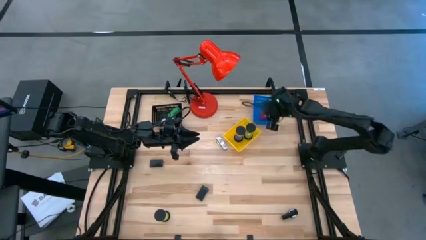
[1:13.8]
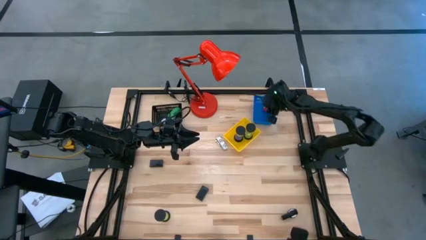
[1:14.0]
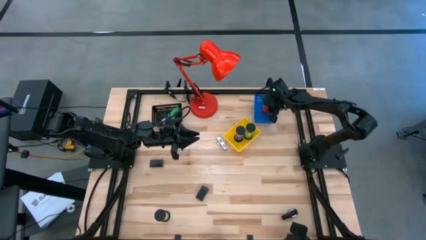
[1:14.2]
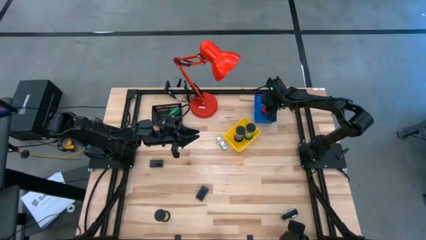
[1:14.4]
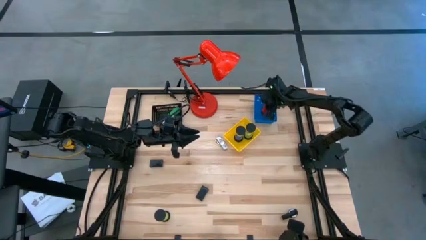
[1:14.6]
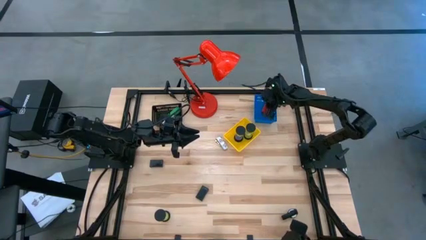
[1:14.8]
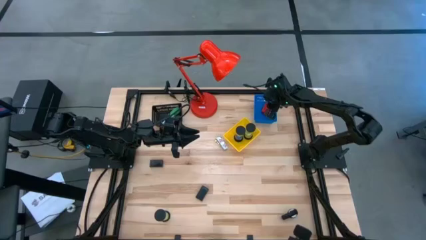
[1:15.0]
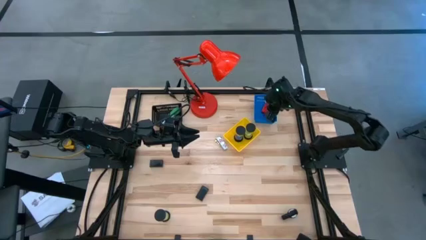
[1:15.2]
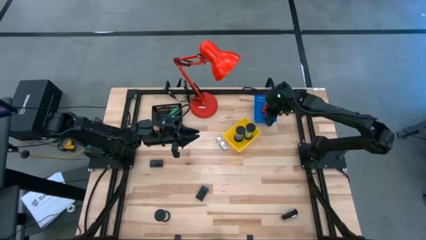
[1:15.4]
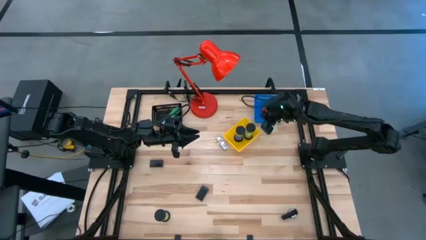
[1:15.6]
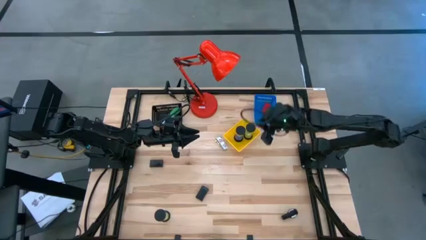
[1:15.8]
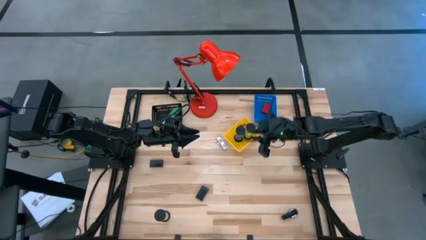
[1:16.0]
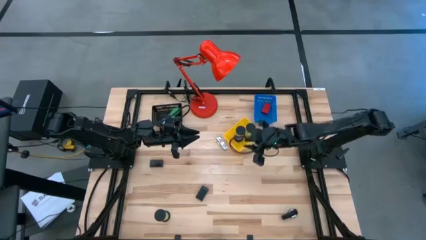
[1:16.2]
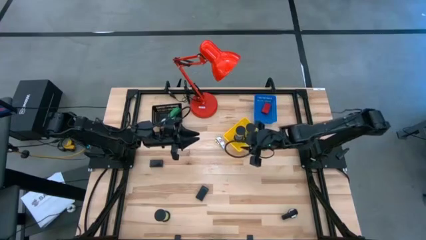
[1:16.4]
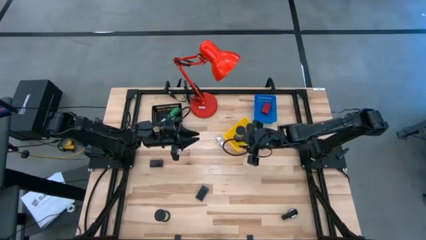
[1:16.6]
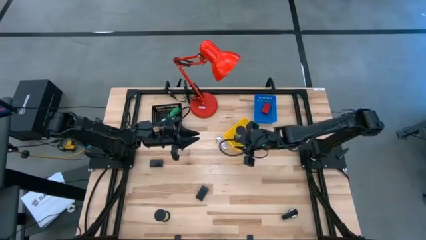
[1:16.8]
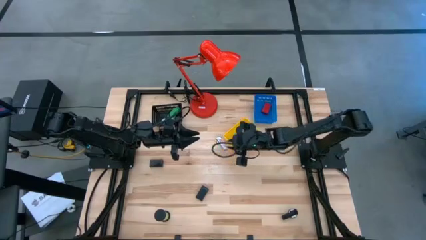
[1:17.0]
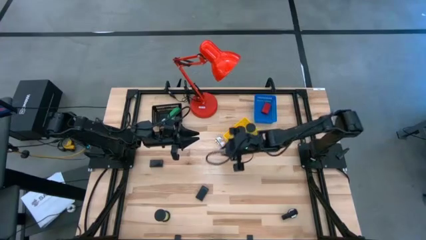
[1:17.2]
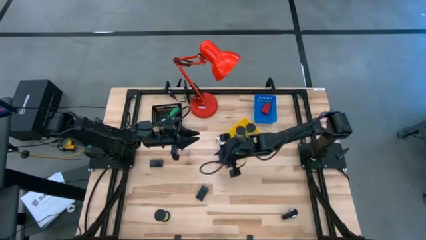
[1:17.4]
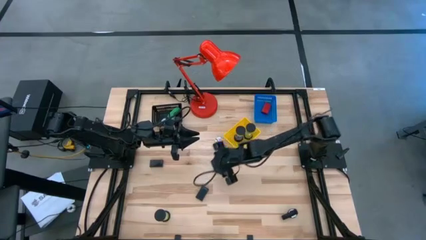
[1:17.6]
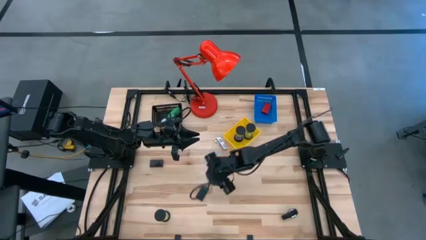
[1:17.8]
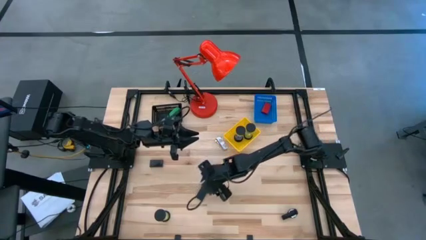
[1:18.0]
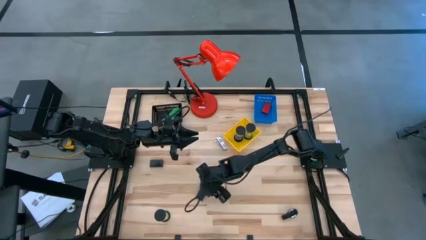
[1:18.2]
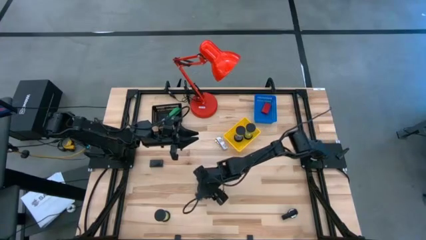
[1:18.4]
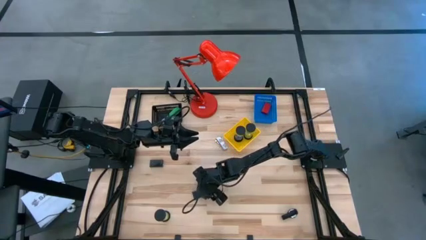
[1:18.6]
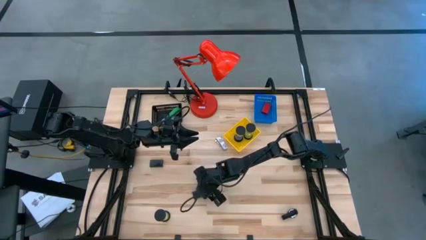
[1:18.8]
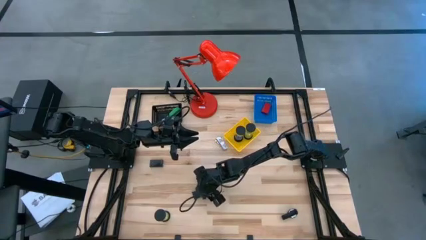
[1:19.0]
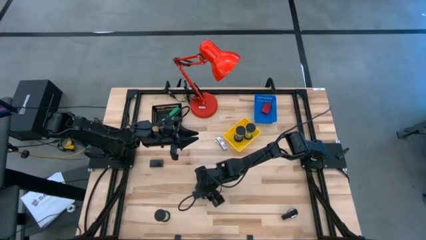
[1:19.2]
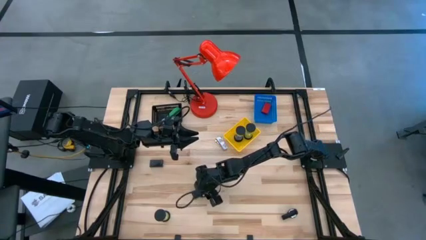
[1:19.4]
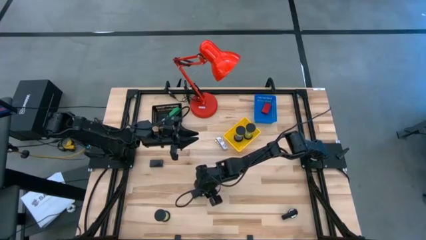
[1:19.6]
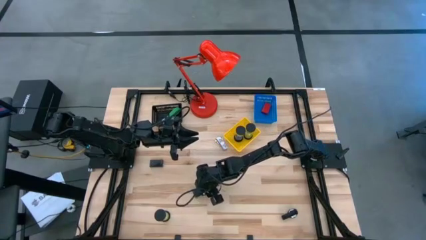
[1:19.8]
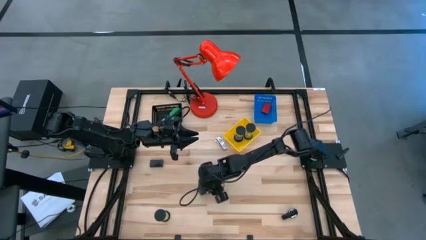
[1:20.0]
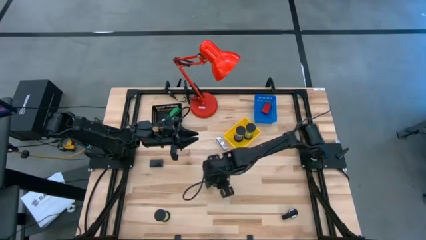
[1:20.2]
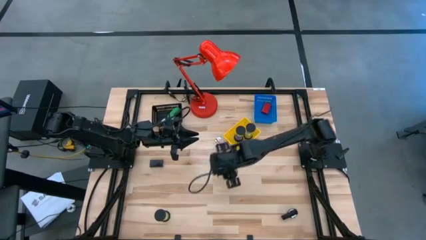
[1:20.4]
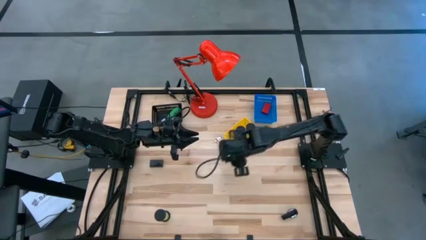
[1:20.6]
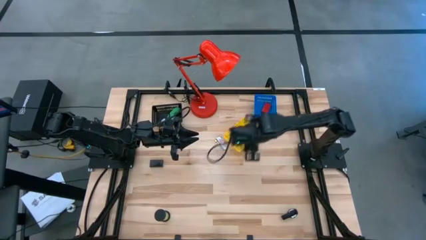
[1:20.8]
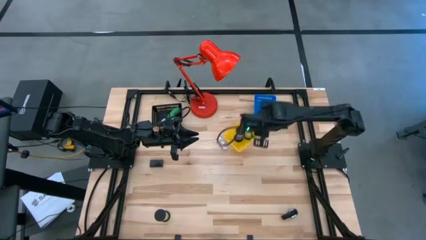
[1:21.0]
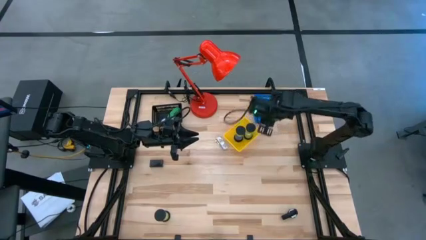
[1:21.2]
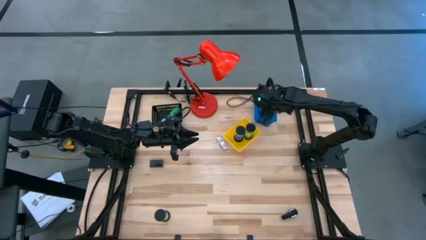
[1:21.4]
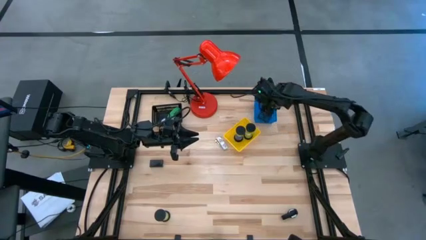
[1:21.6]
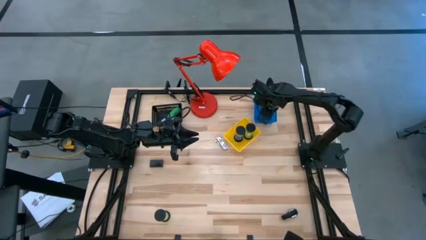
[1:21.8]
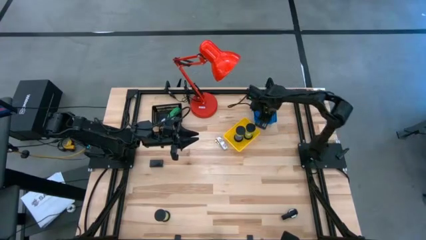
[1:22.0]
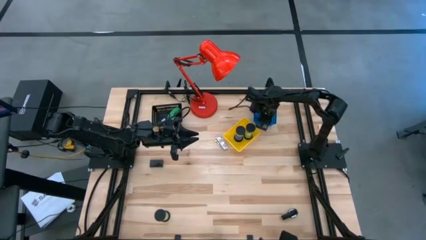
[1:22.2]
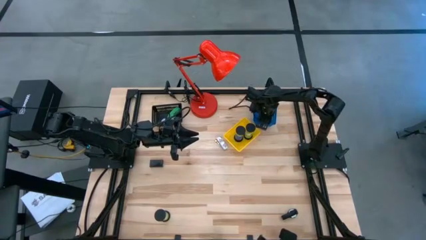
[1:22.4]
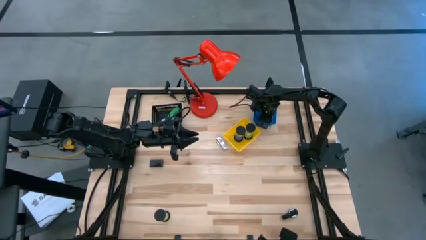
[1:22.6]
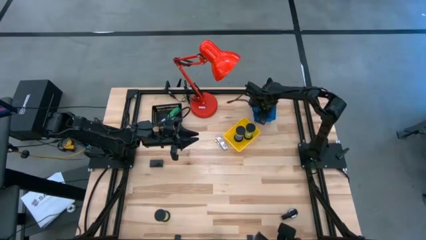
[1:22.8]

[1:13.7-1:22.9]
Task: Pick & Place Office items
Put the black digital clock into the blue bin

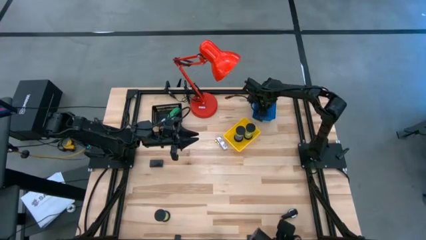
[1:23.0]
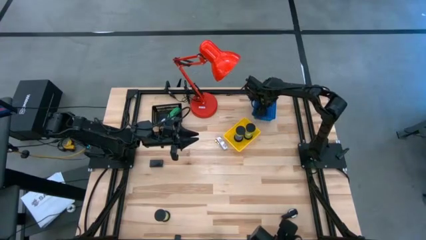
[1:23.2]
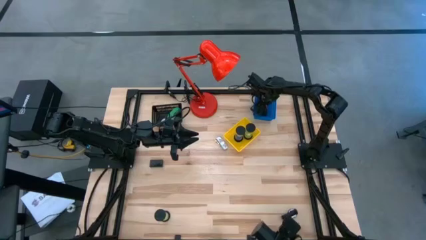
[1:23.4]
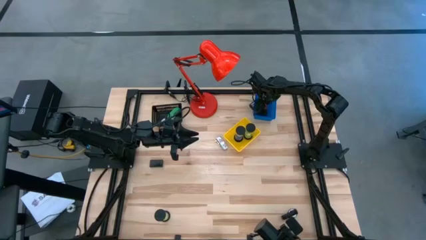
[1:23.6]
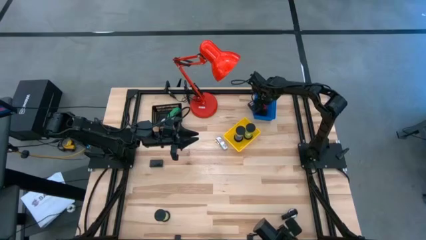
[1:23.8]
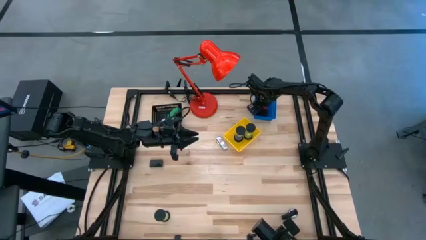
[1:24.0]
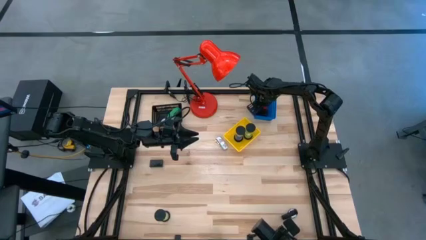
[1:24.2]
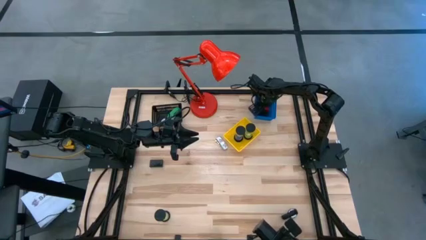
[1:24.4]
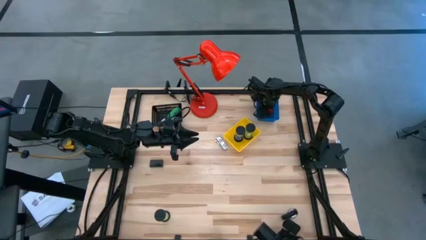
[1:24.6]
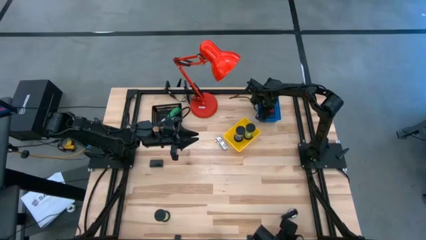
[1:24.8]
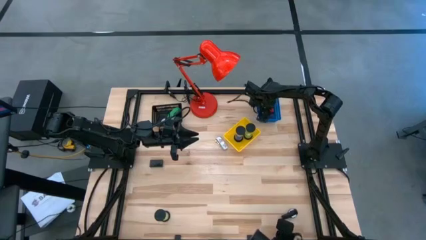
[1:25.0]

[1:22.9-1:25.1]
Adjust the red digital clock
